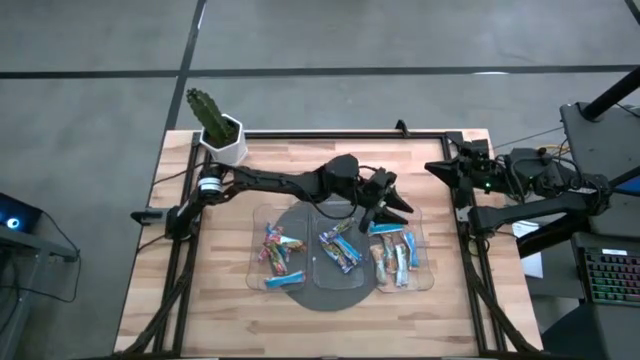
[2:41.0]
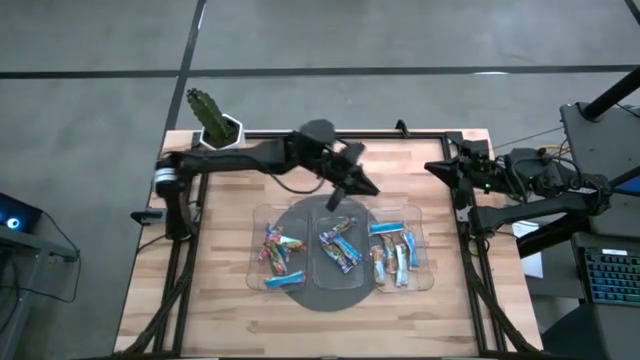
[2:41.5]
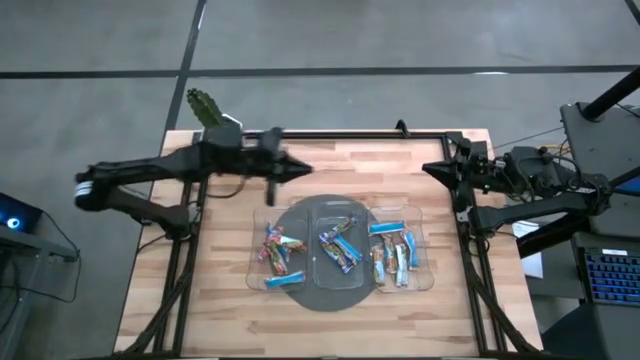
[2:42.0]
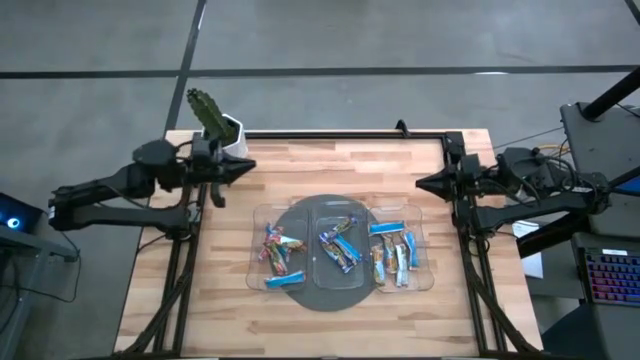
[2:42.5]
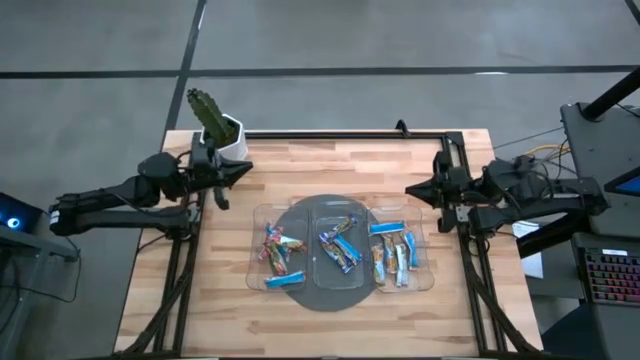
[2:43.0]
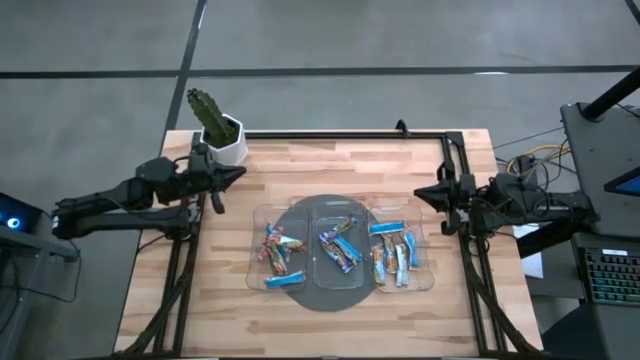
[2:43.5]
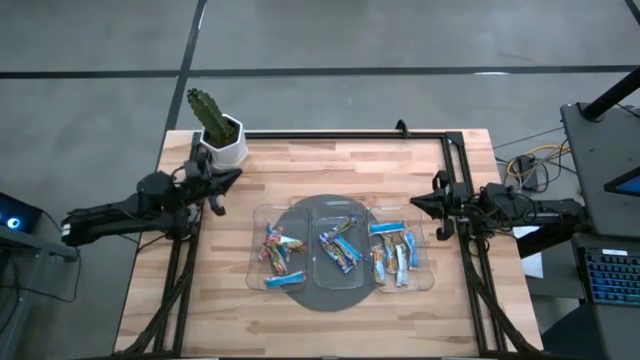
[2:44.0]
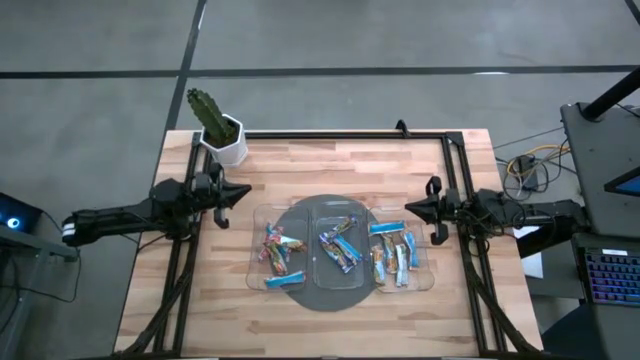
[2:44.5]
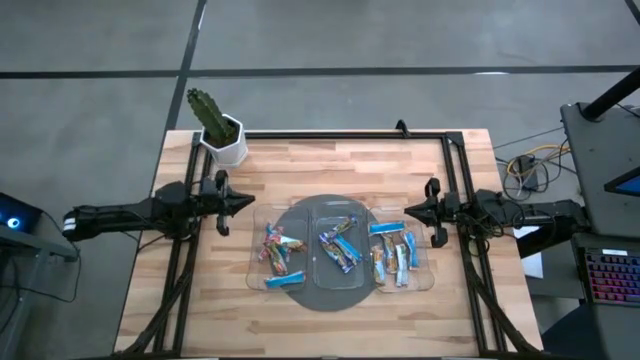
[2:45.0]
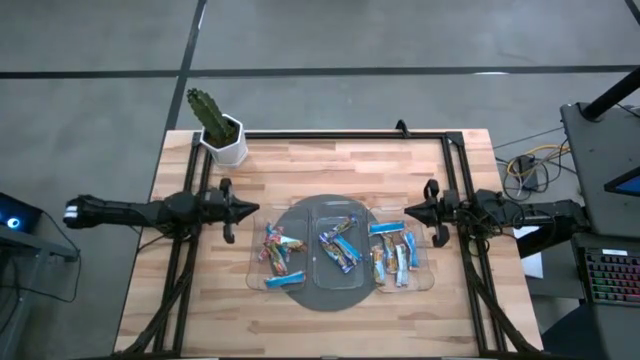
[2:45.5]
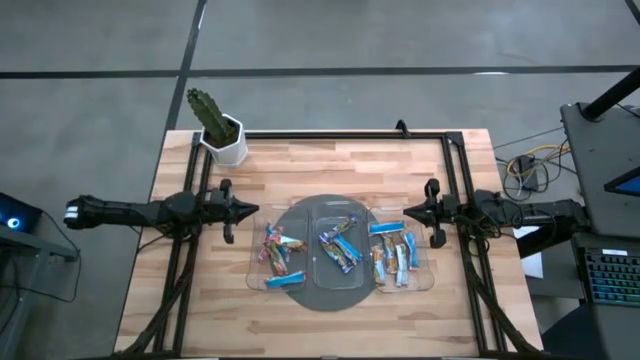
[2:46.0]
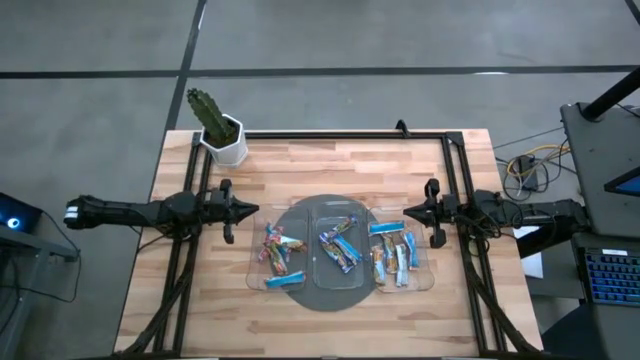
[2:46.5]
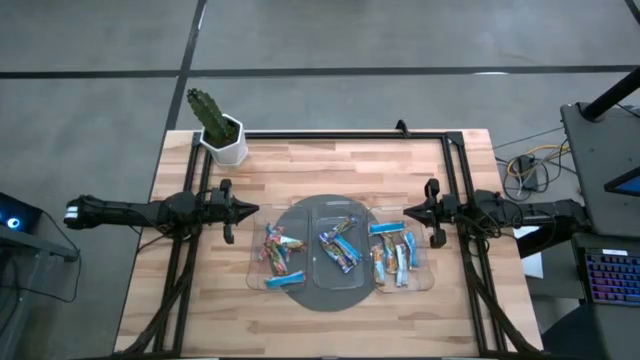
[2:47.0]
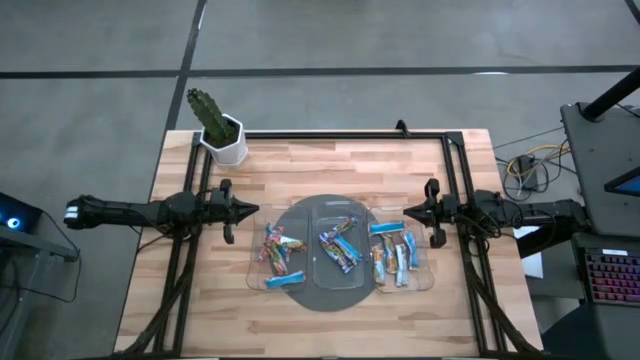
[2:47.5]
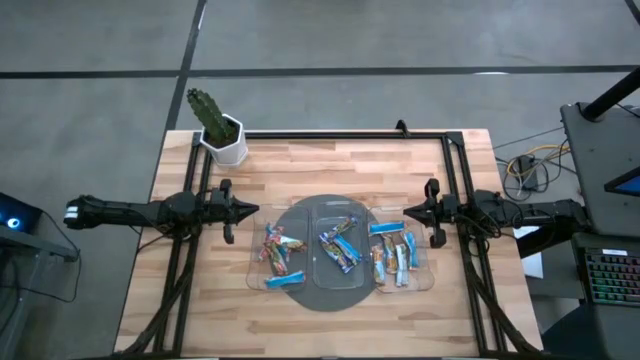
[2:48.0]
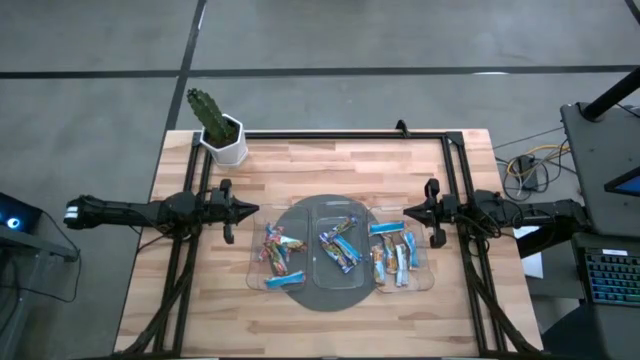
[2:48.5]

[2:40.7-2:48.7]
Task: Pick and place Granola Bars by type
Return to Home Position

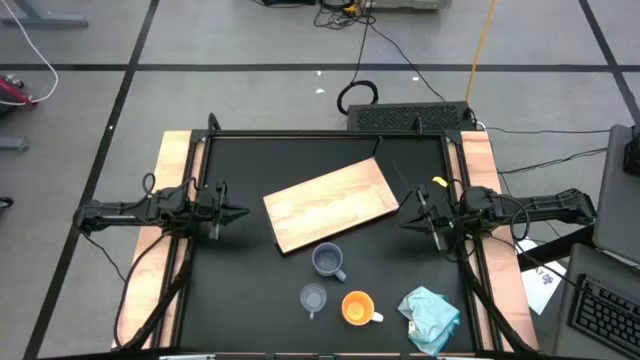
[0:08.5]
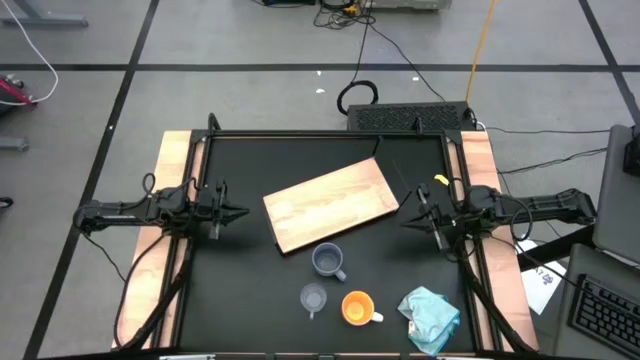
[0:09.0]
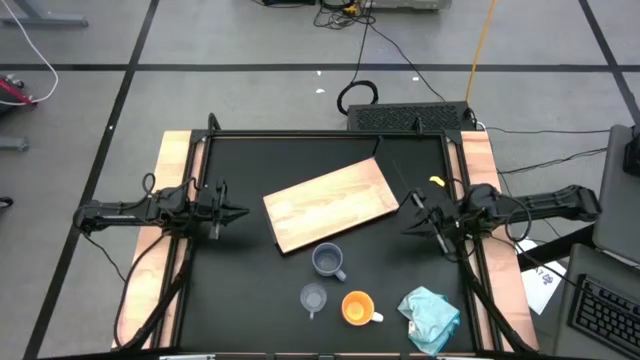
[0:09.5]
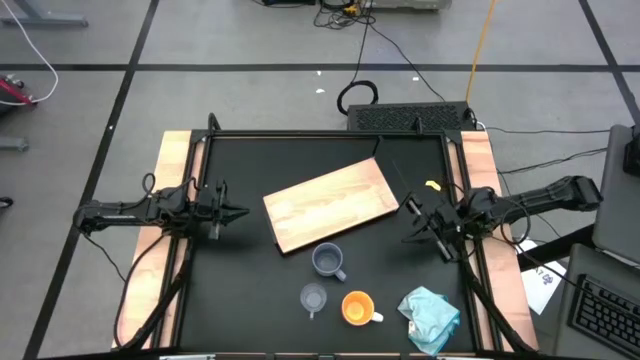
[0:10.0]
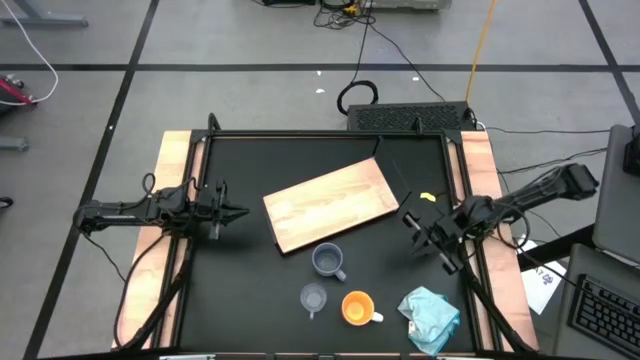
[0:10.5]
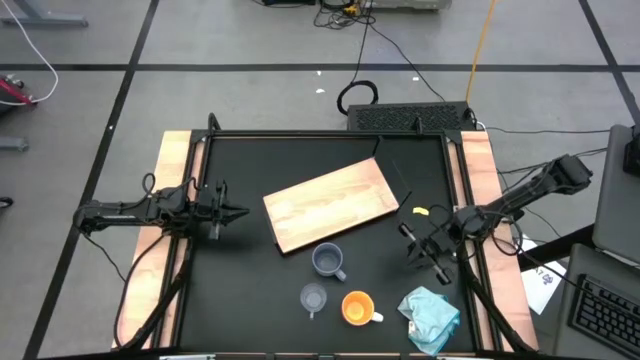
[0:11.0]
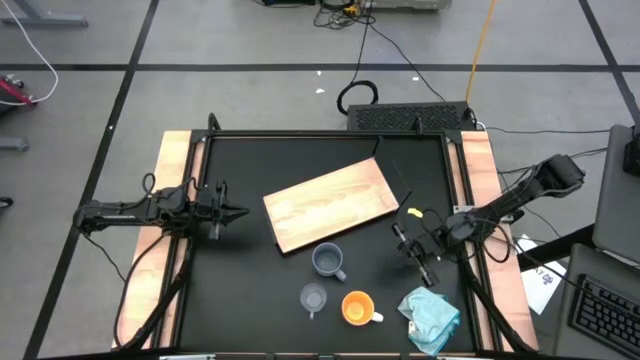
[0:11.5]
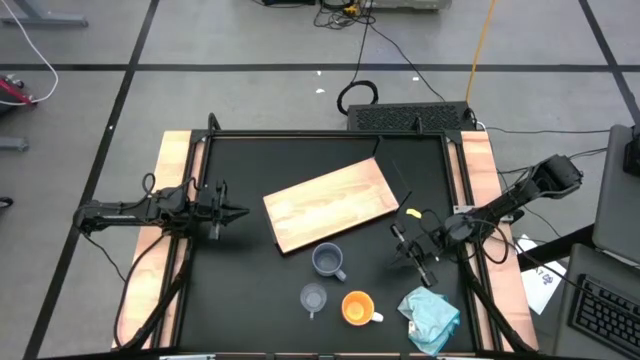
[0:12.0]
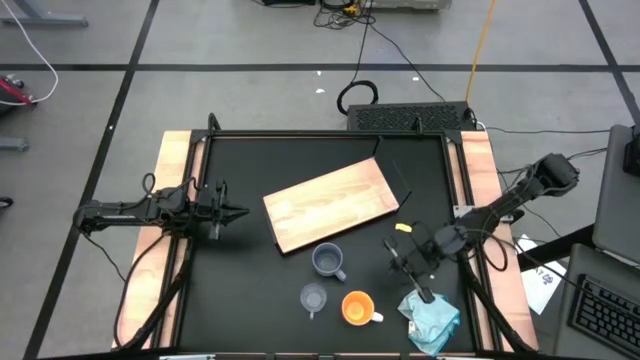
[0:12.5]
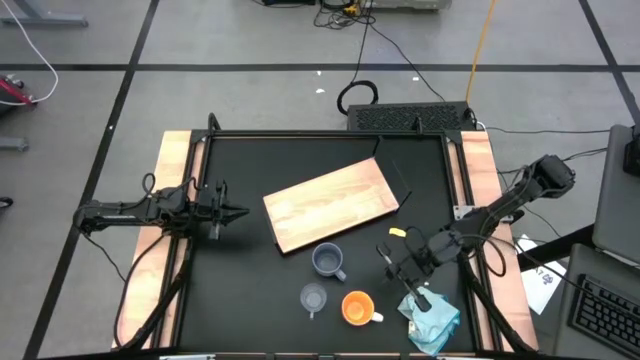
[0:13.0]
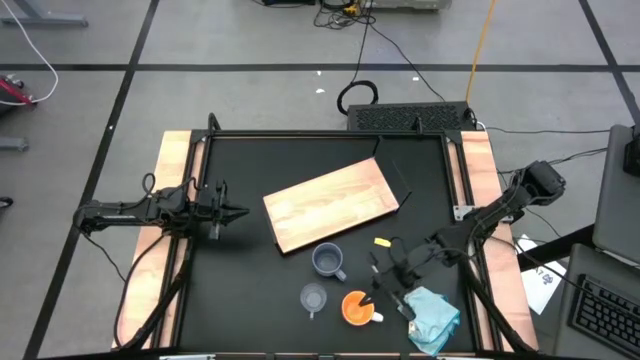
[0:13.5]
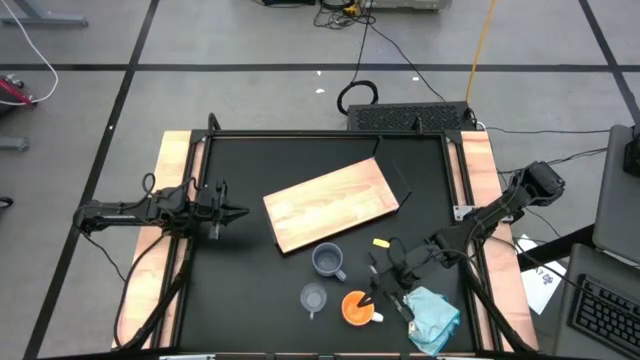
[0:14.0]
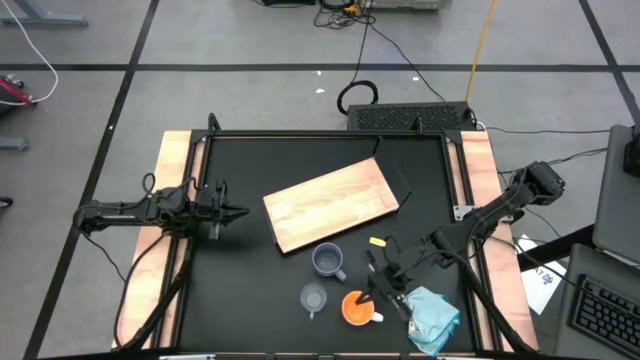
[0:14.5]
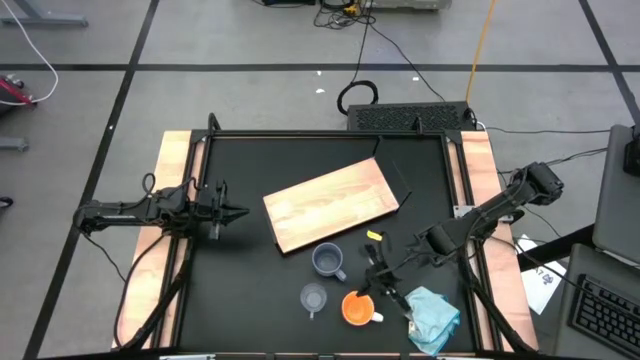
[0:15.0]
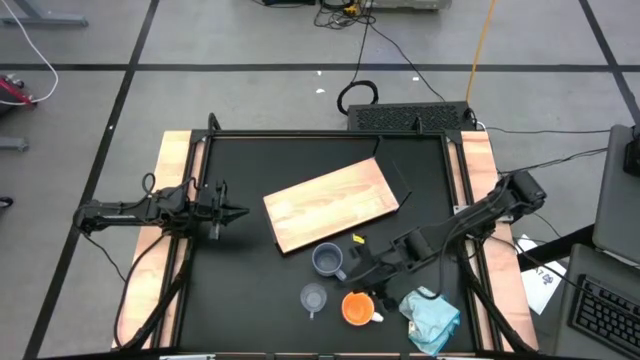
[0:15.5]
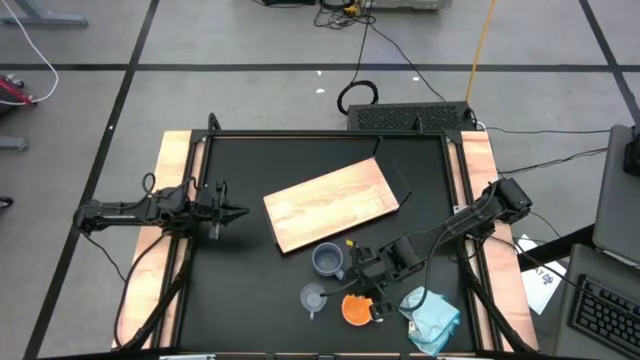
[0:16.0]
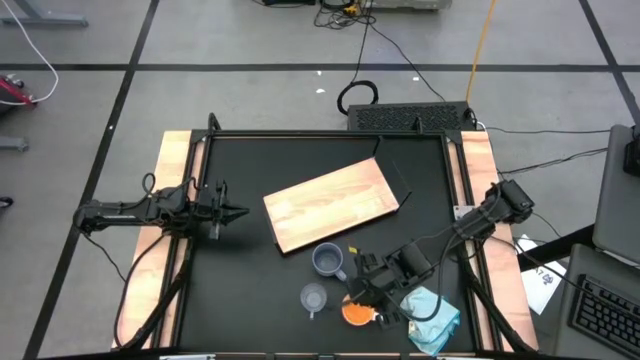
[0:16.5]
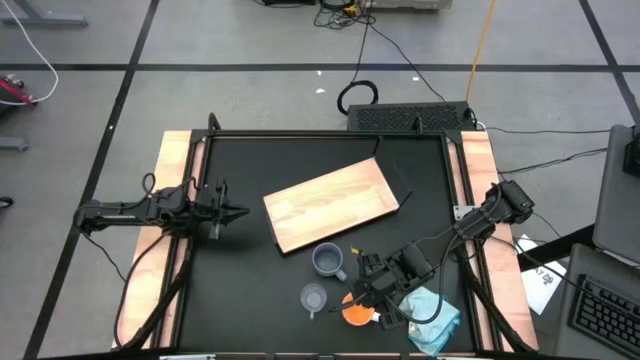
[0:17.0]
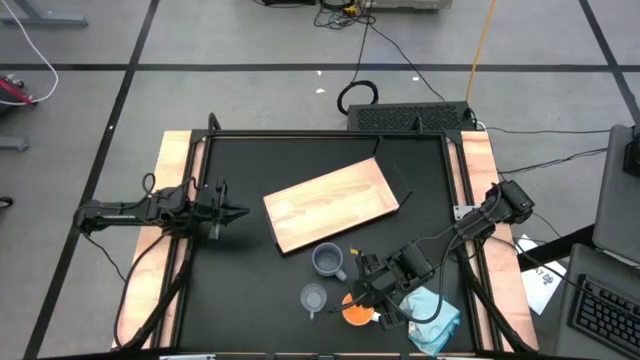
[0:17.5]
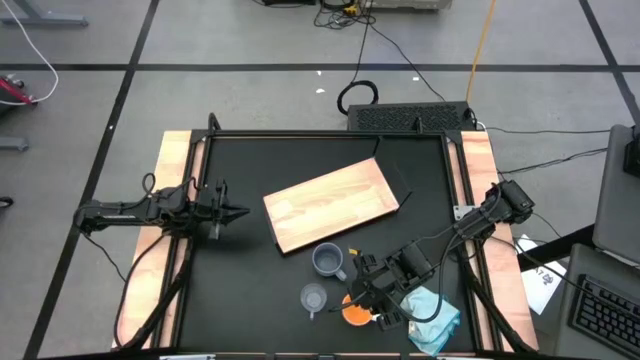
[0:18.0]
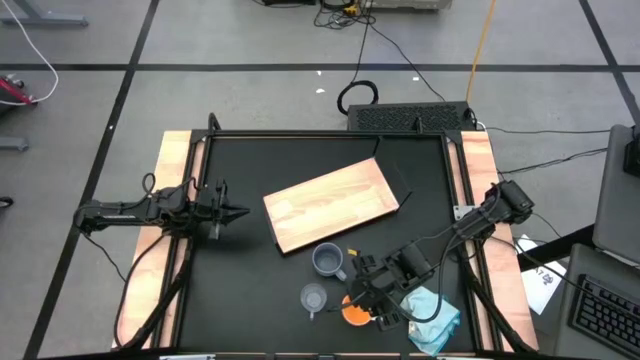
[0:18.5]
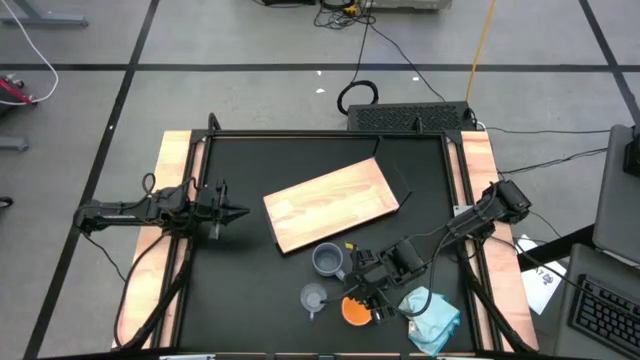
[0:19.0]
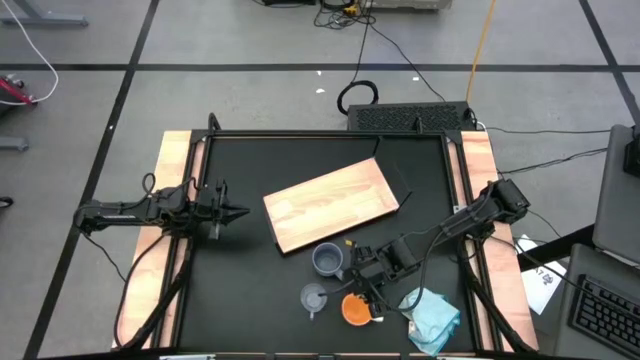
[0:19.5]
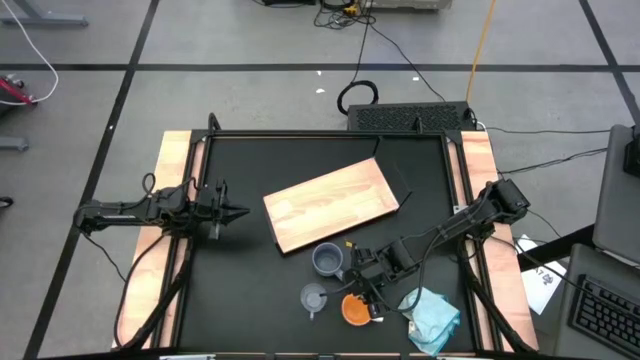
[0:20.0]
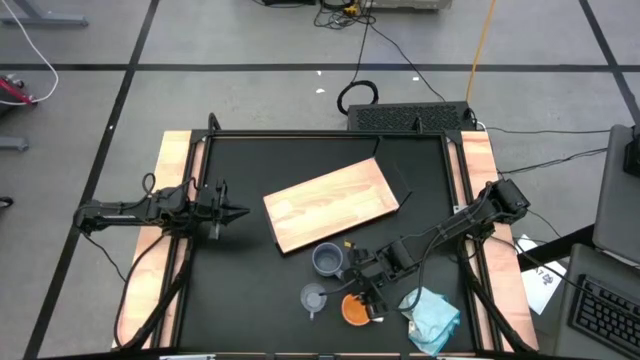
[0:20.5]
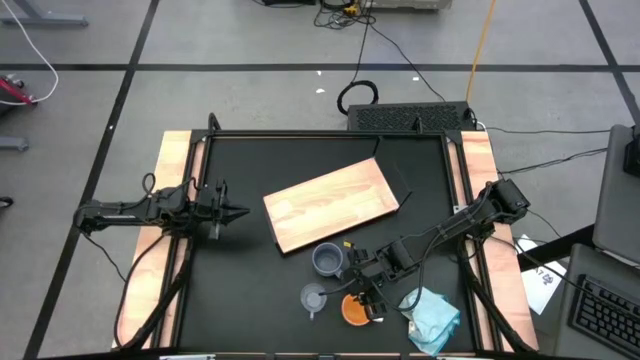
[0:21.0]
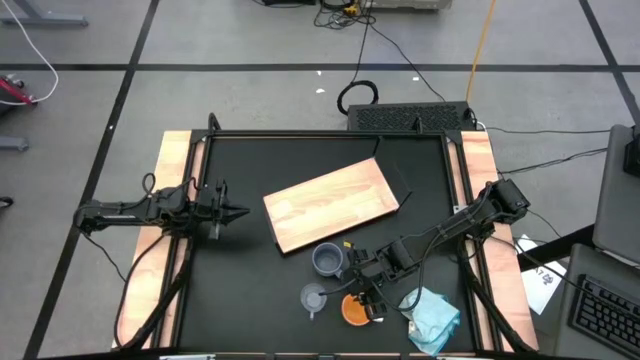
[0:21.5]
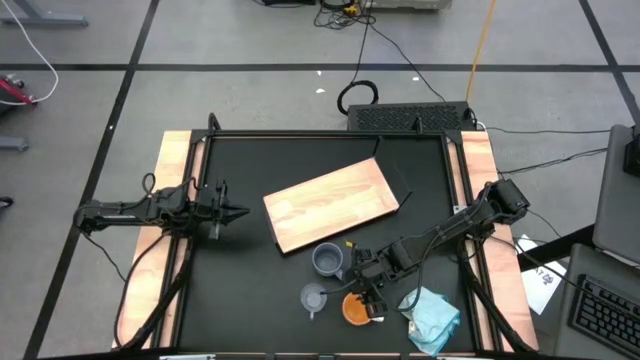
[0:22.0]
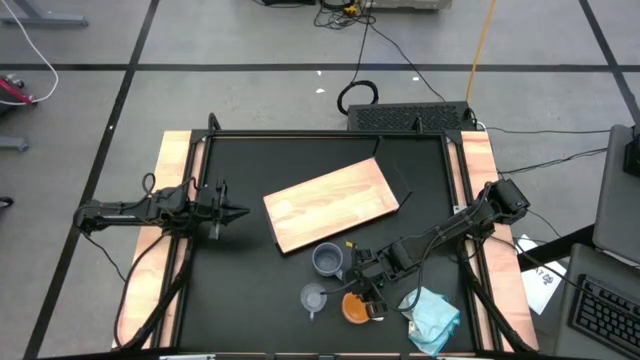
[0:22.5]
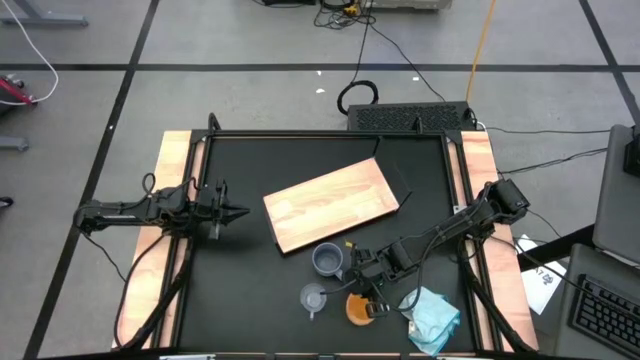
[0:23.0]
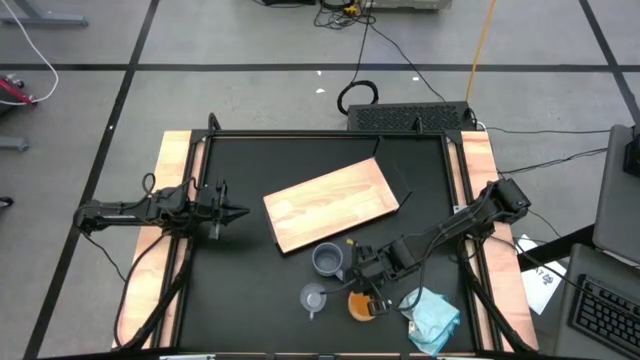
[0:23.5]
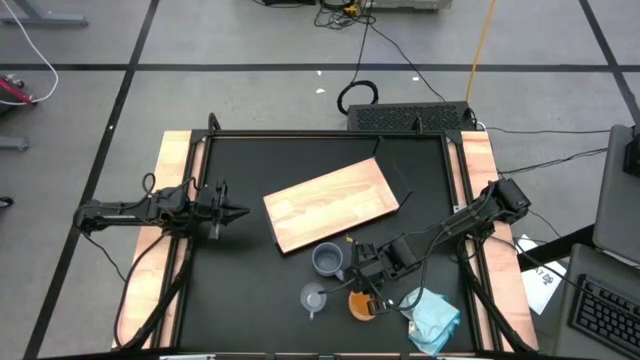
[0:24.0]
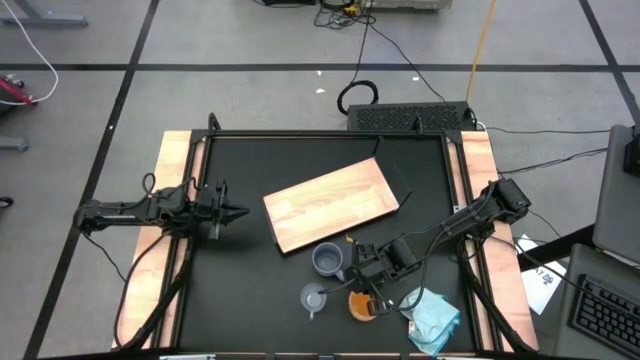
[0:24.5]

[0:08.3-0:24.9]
Task: Stack small to large cups/mugs on shelf
Put the orange mug on the shelf
